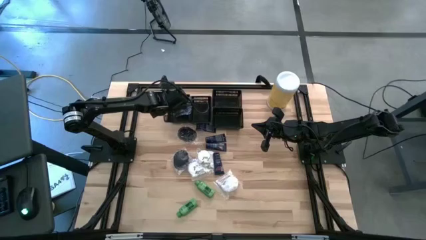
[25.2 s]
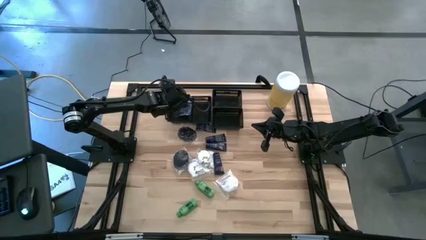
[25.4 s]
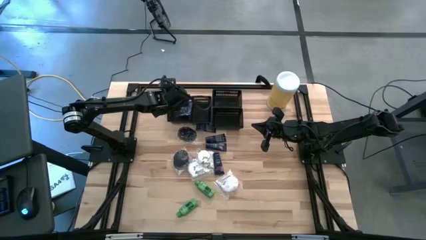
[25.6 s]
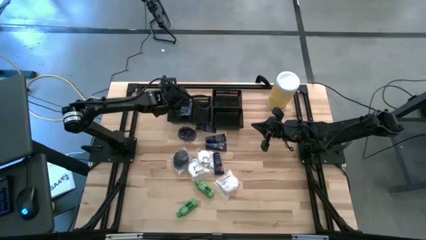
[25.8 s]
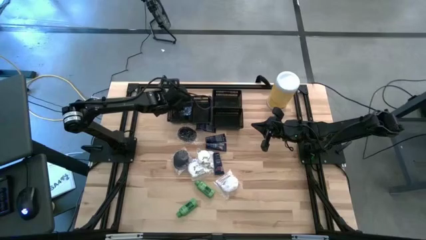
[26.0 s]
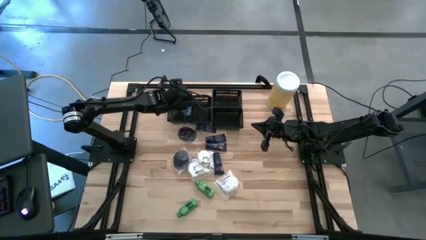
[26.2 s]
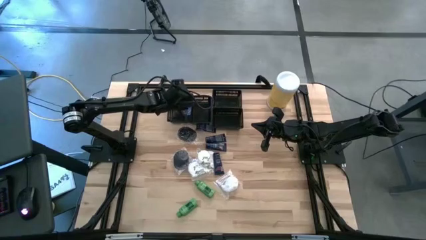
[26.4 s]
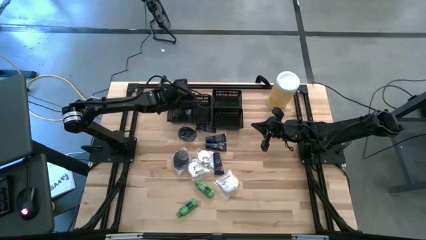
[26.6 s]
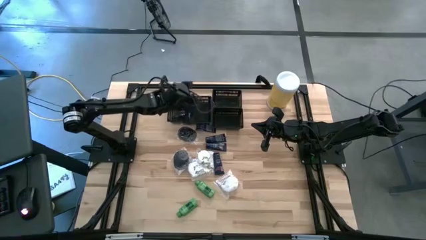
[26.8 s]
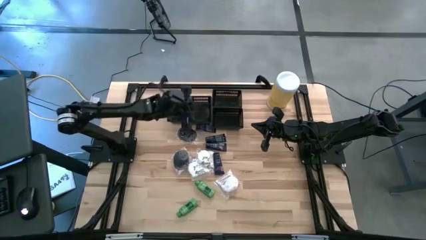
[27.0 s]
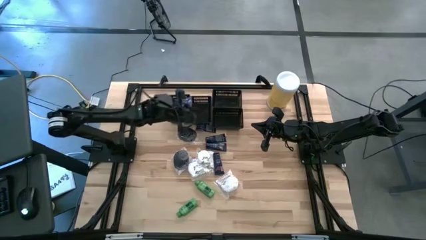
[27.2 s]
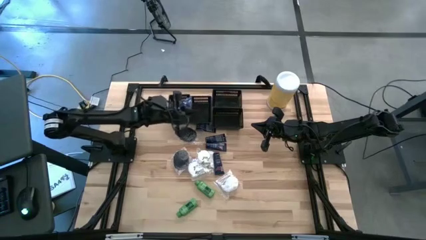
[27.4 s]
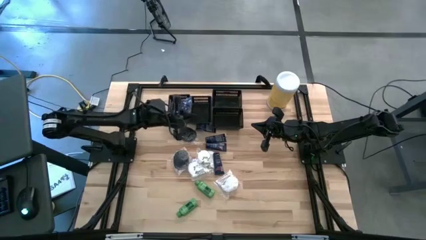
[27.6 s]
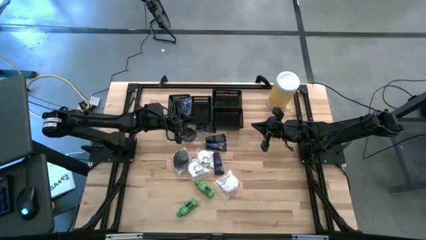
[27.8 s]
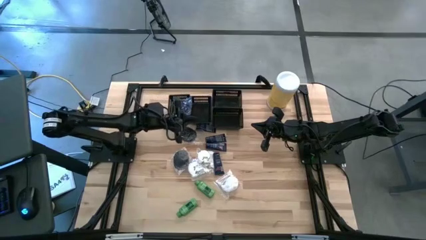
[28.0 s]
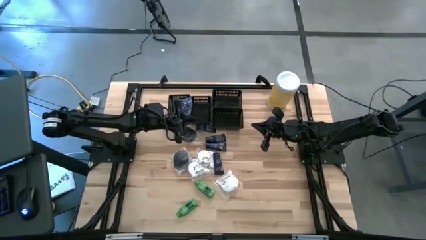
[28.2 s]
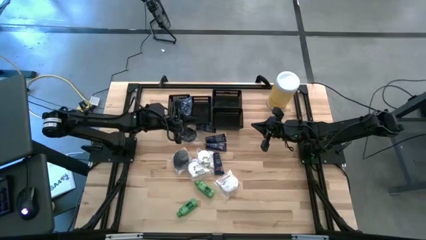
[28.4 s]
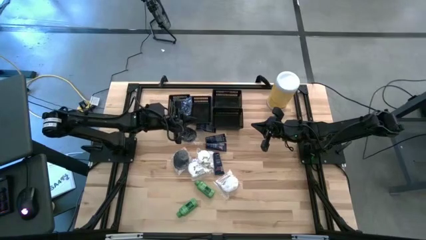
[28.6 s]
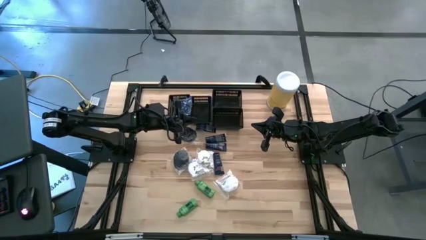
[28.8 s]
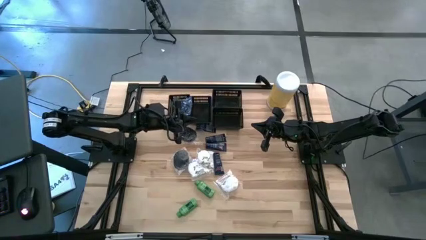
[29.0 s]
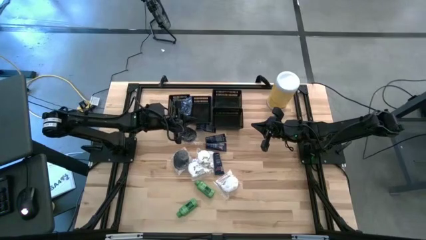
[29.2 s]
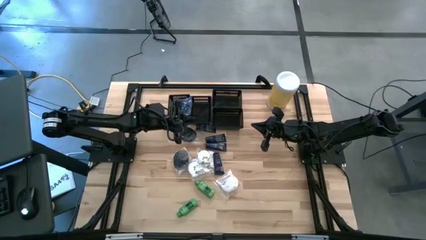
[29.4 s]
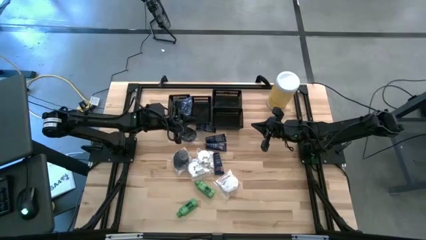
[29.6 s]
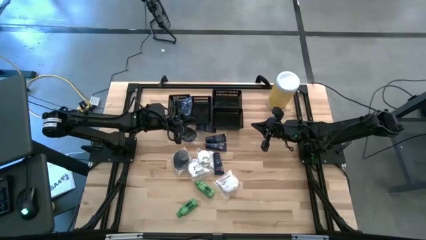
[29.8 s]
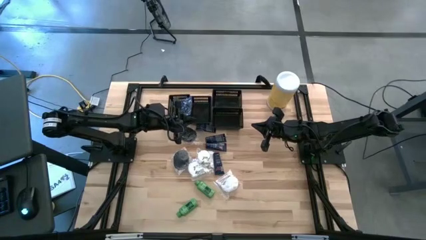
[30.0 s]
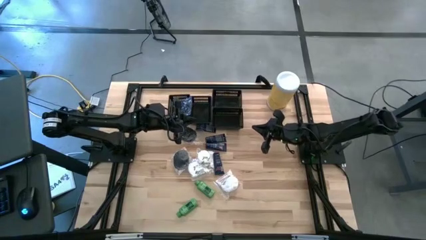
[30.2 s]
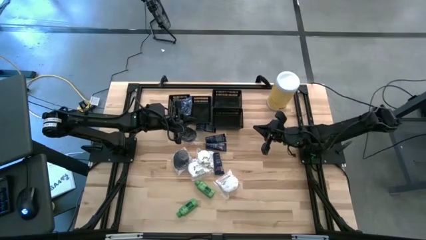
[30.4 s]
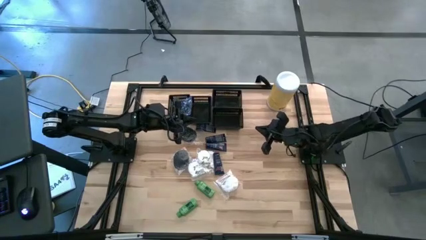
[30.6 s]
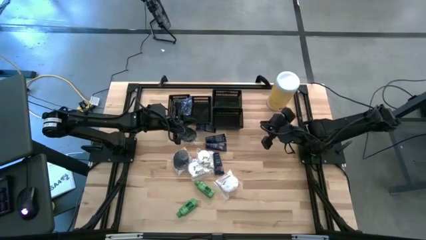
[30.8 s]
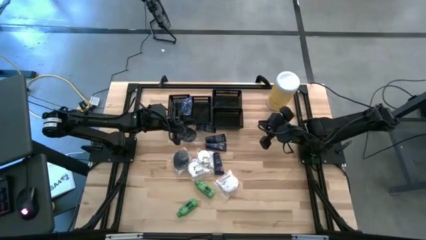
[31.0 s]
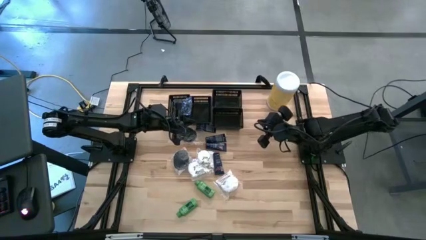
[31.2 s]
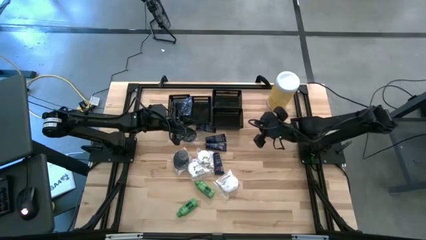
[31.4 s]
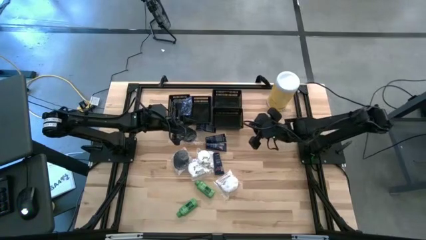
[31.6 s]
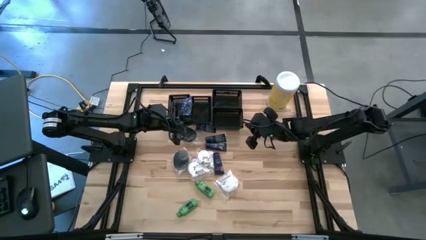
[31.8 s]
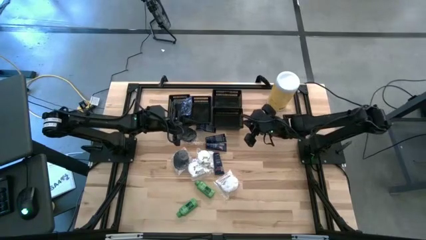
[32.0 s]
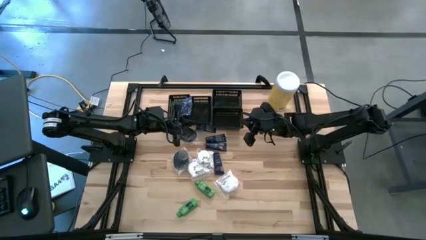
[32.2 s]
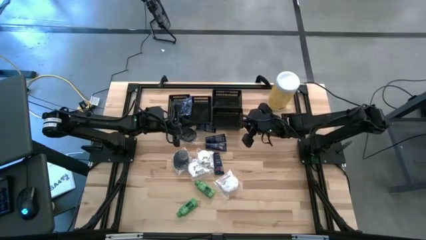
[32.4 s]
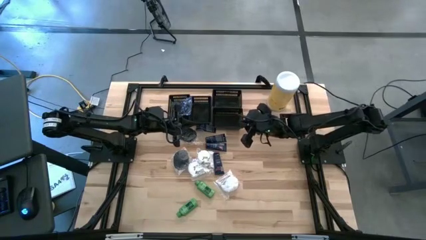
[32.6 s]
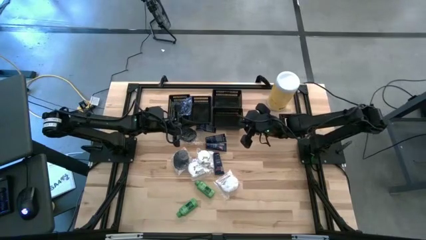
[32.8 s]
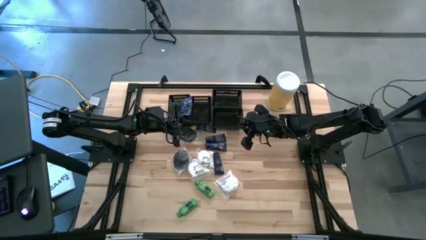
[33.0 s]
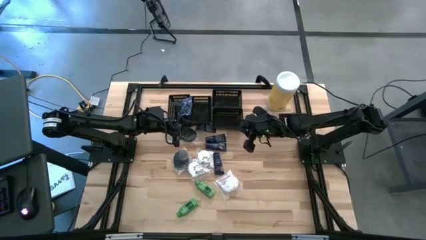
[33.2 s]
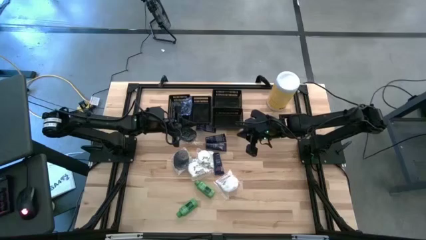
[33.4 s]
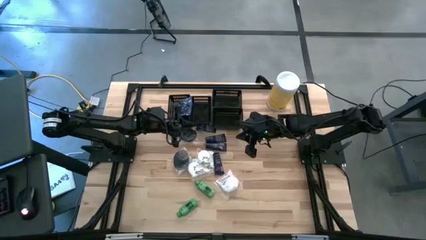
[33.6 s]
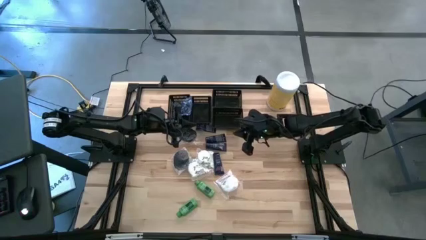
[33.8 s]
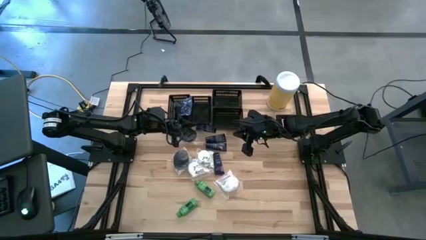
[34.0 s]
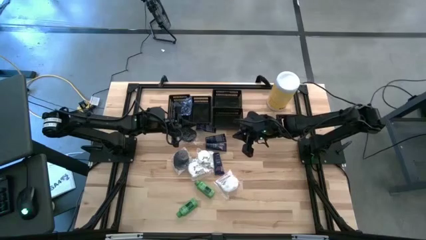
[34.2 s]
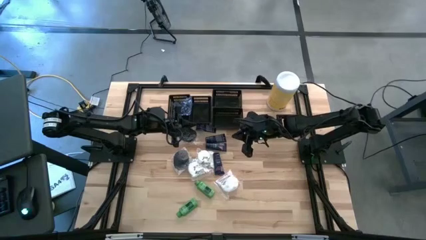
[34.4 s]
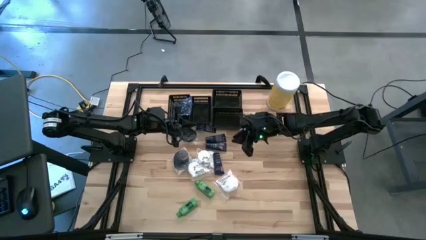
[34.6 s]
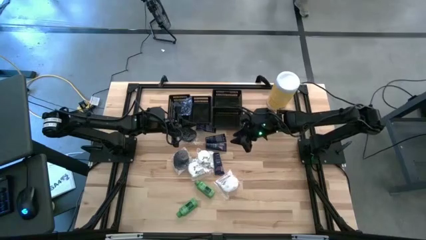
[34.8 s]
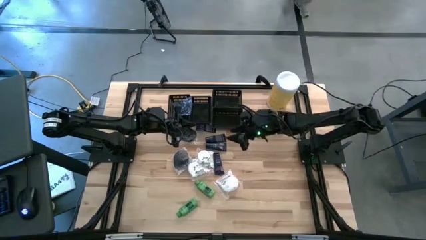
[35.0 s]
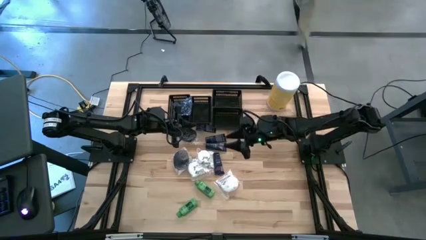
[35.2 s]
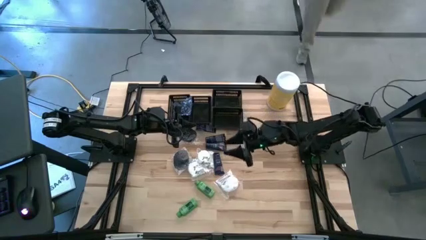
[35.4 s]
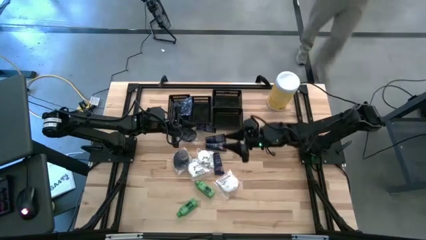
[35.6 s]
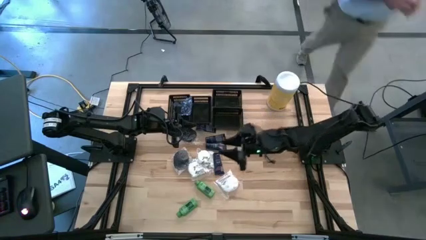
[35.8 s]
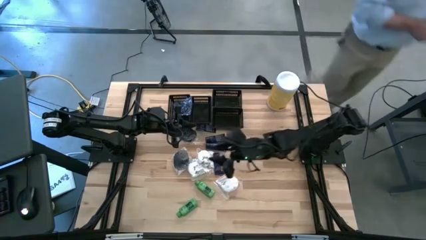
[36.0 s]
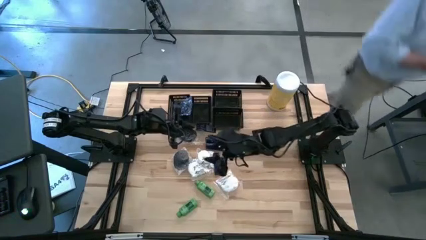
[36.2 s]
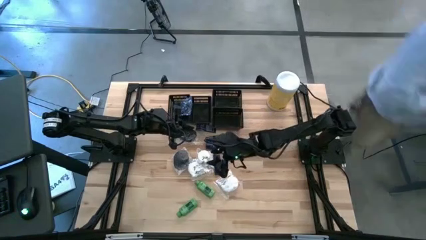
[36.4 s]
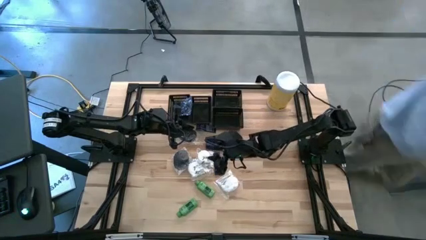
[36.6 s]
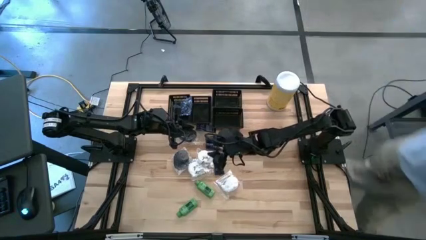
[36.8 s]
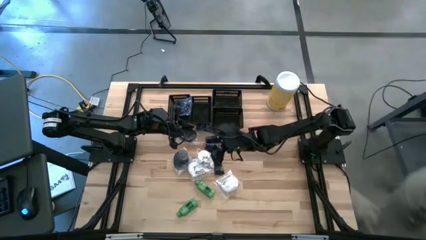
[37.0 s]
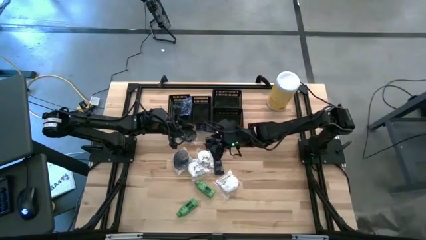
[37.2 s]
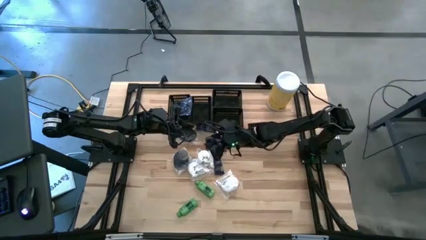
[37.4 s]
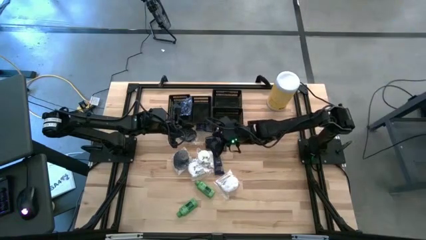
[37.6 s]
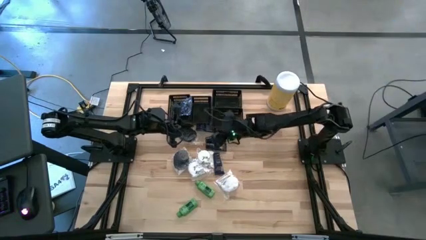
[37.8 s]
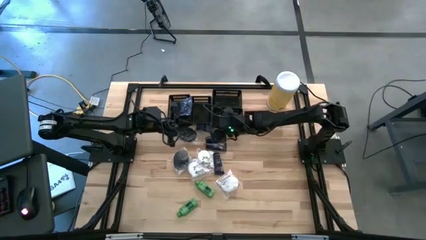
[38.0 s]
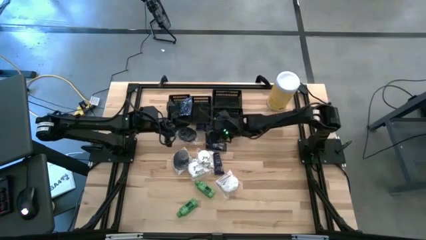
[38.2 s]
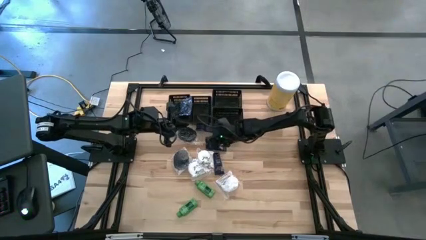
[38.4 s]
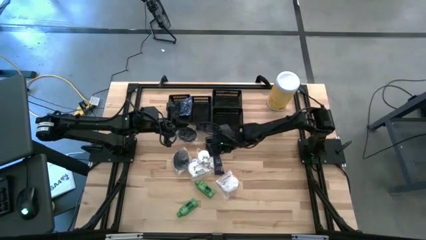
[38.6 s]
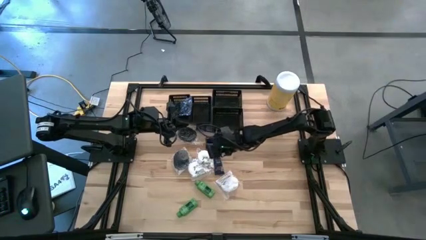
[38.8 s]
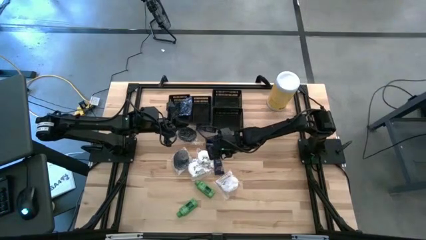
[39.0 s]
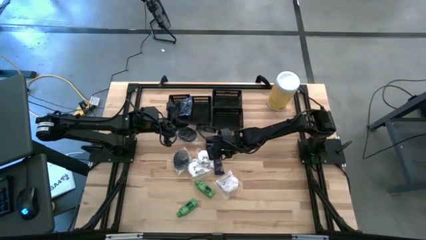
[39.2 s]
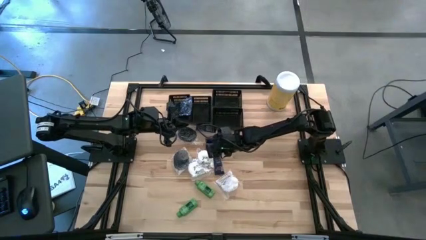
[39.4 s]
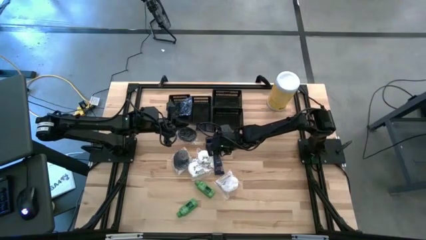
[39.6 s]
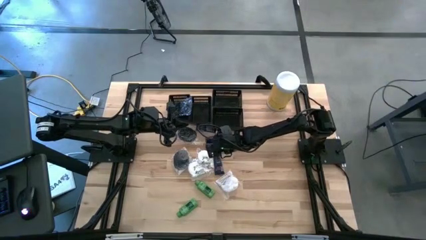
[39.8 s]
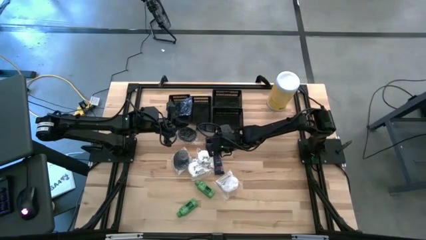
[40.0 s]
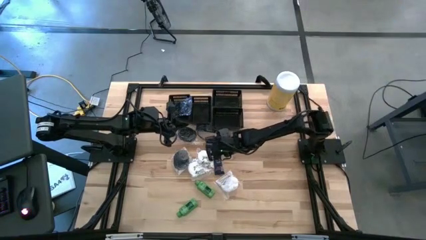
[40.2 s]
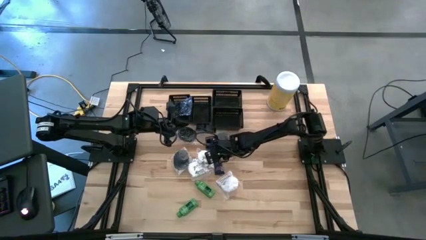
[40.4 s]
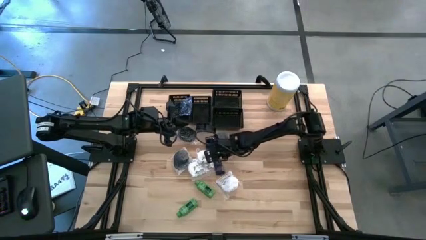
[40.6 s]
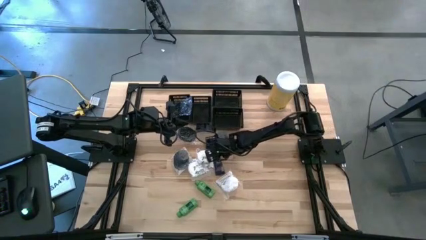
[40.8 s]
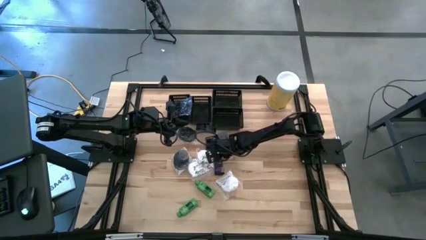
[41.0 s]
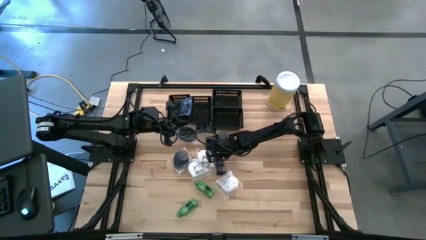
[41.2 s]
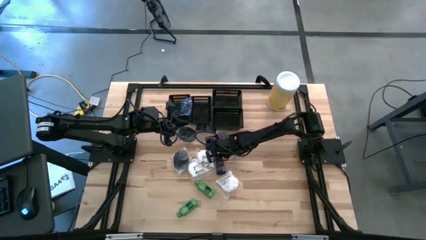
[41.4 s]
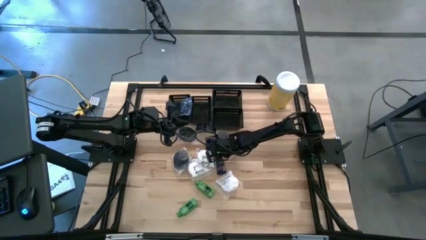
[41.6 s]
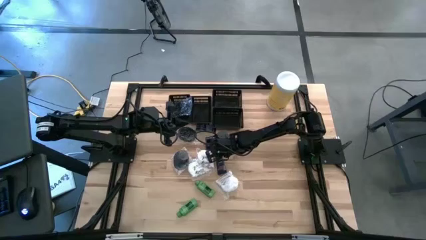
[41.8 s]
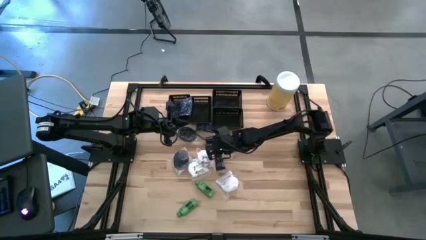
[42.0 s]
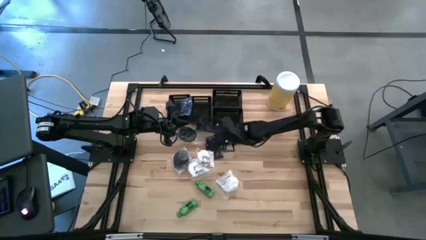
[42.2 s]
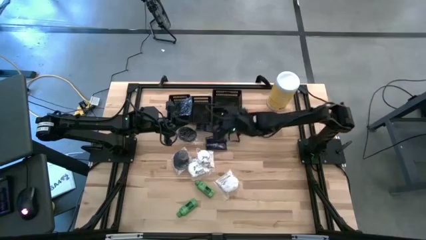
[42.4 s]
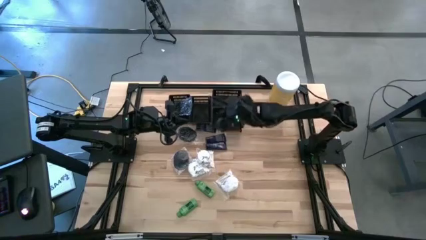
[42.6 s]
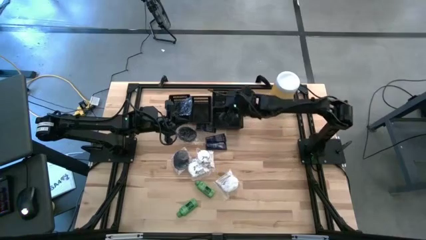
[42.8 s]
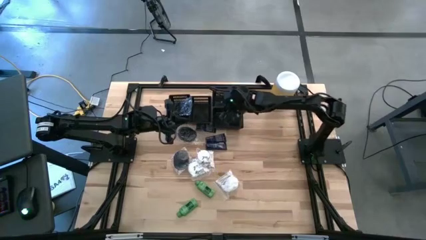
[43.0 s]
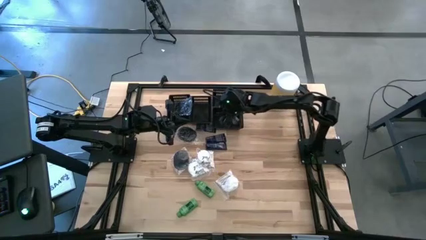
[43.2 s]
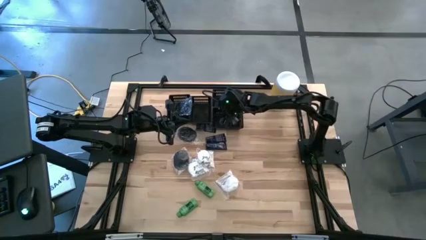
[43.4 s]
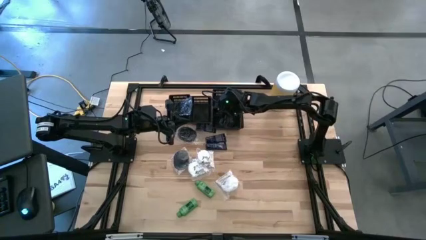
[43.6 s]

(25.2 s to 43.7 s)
Task: Pick & Place Travel size toiletries
Put the blue shave cream into the bottom black bin
